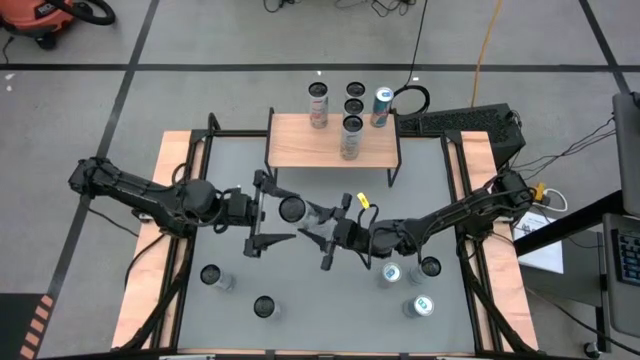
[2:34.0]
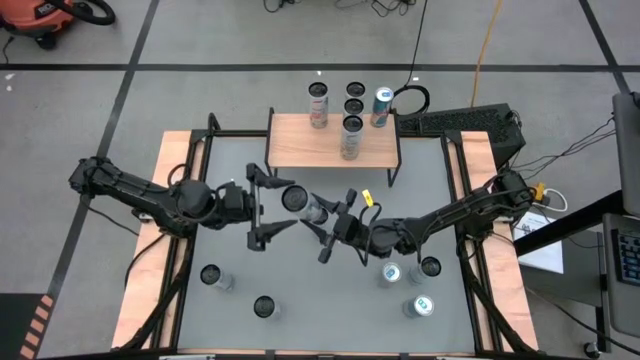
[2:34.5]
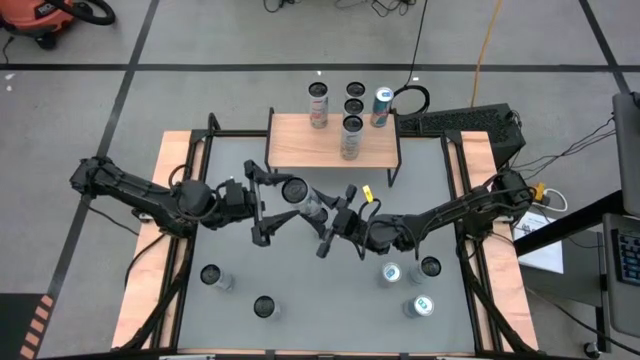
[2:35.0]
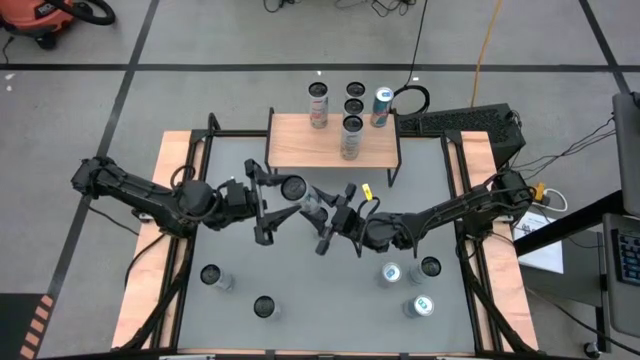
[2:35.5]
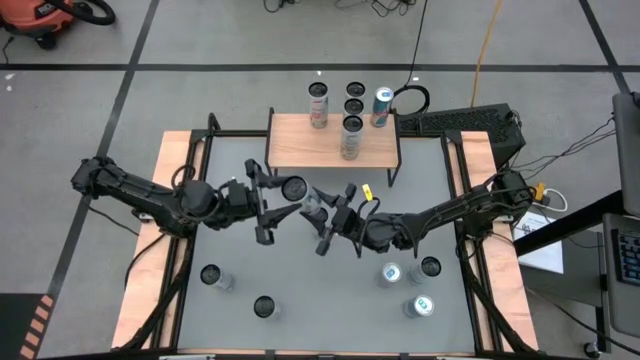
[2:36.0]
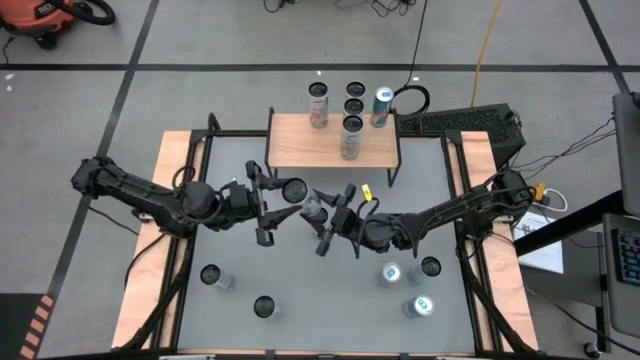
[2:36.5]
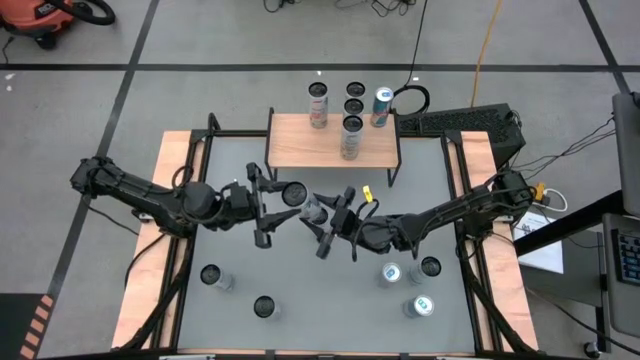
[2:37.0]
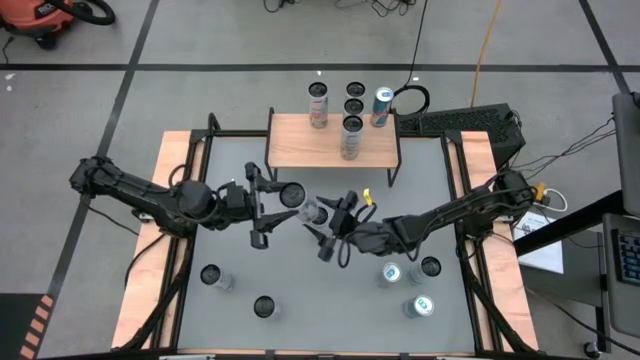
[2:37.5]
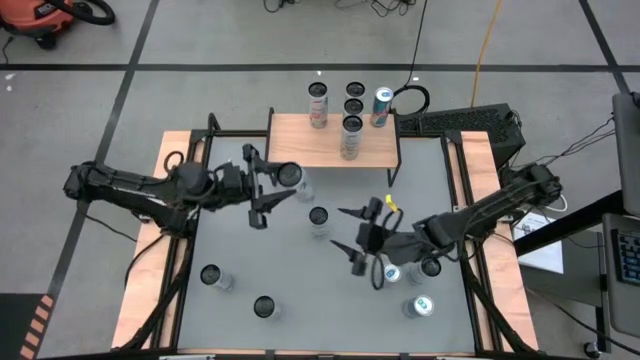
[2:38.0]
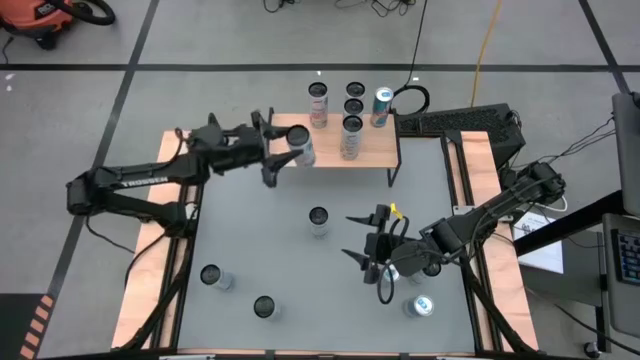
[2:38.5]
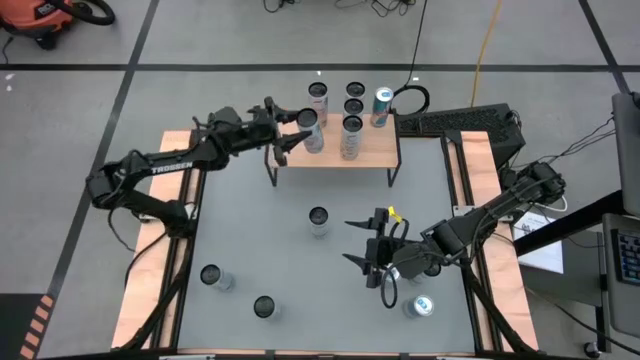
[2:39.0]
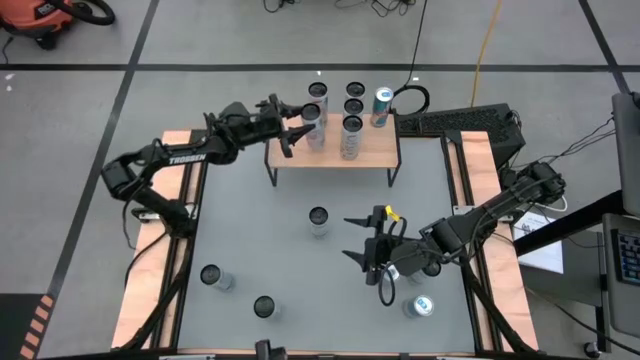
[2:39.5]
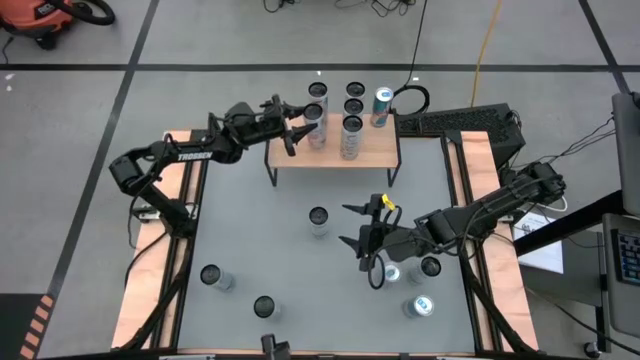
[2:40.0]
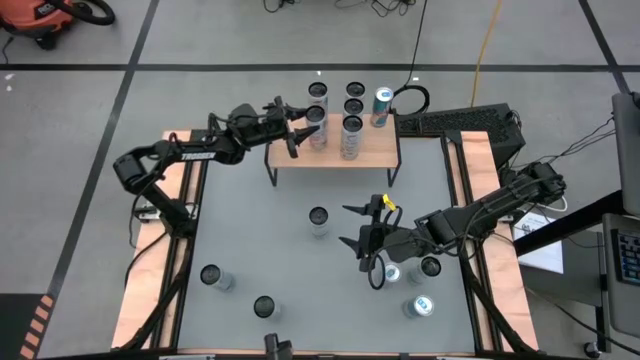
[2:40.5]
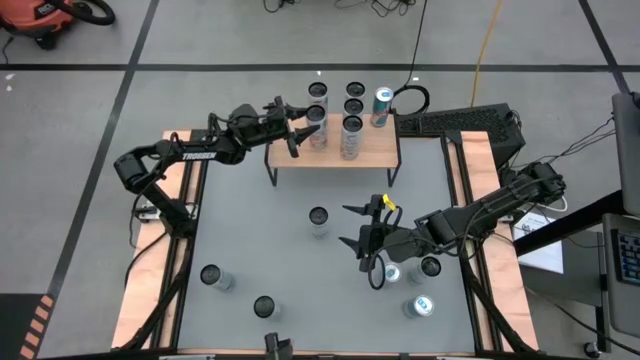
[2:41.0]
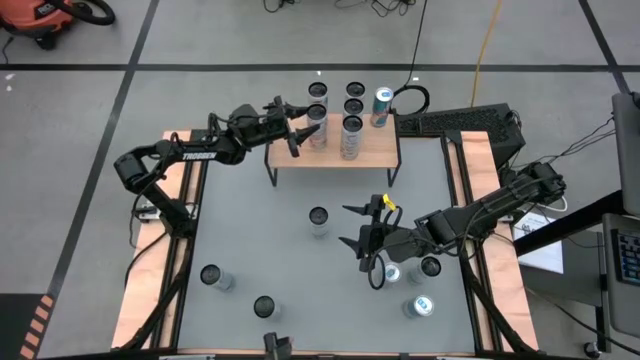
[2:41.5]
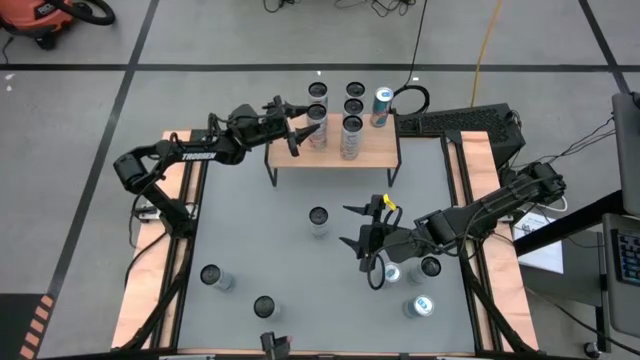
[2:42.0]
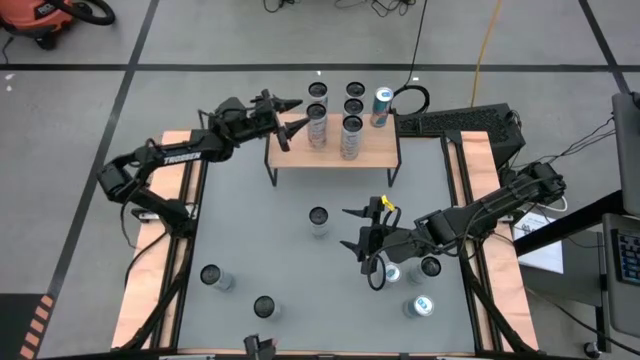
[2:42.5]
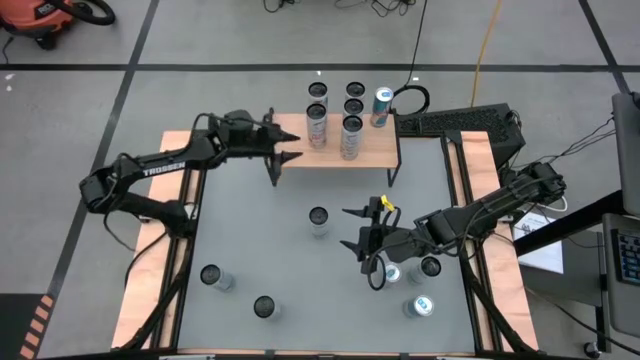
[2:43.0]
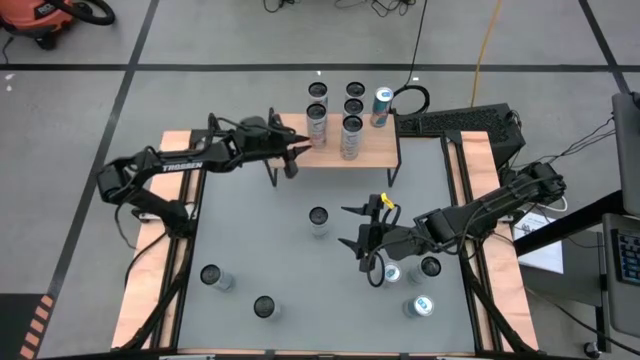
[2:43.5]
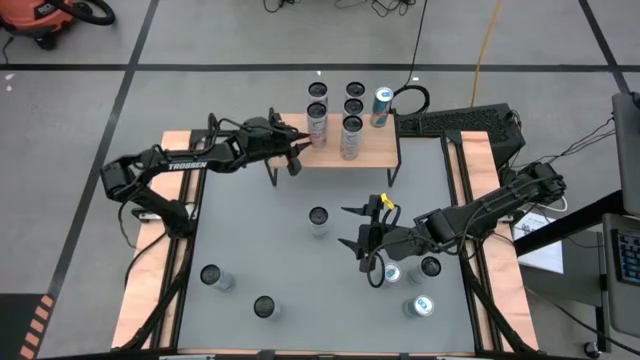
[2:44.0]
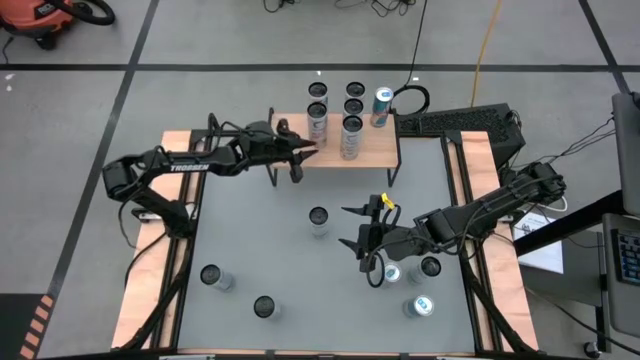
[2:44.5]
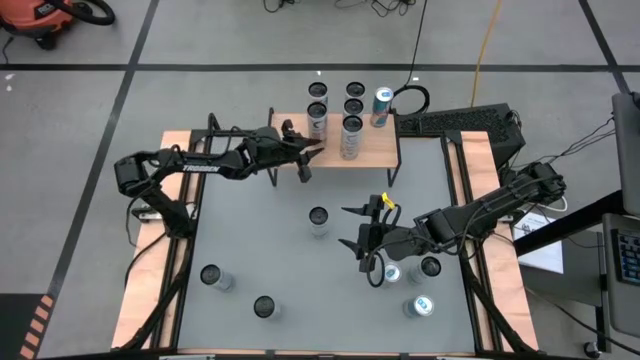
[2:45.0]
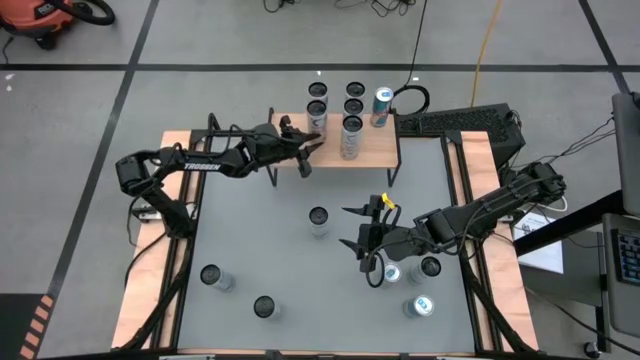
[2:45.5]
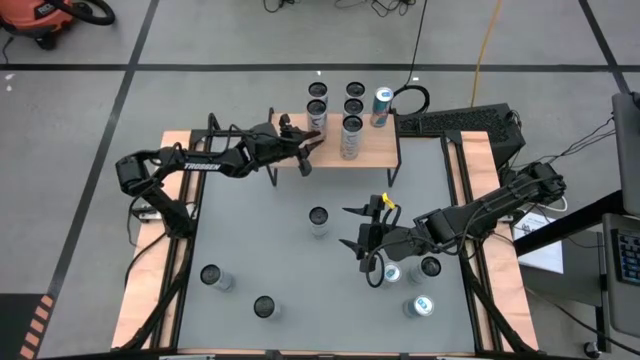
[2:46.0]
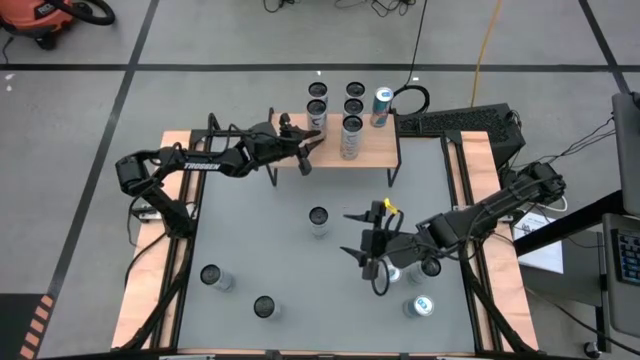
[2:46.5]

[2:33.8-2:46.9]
Task: Place canned beverage on shelf
Put the top white pink soda can on the shelf aligned with the other white pink soda can

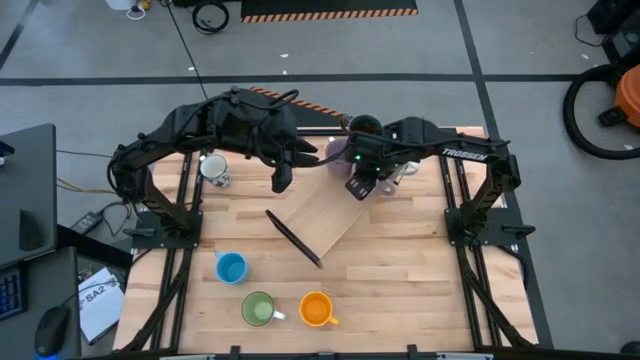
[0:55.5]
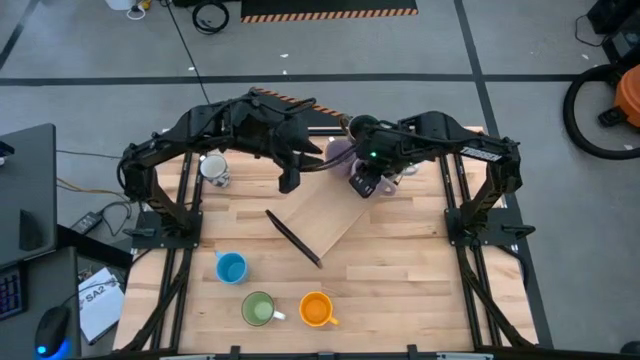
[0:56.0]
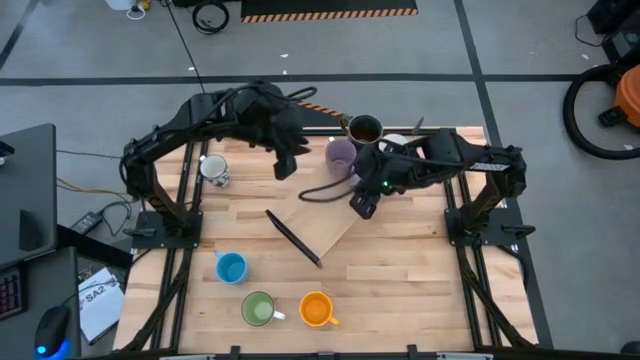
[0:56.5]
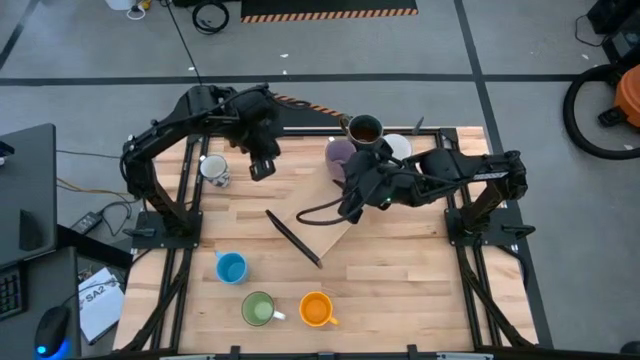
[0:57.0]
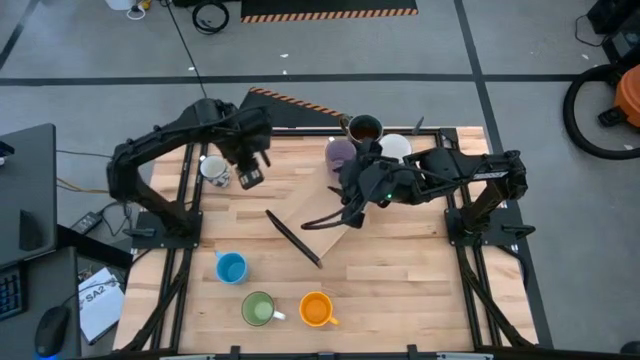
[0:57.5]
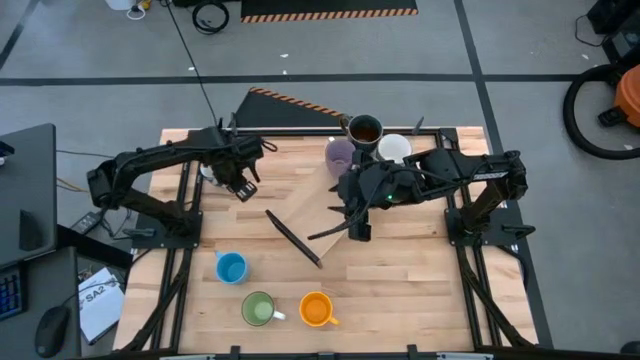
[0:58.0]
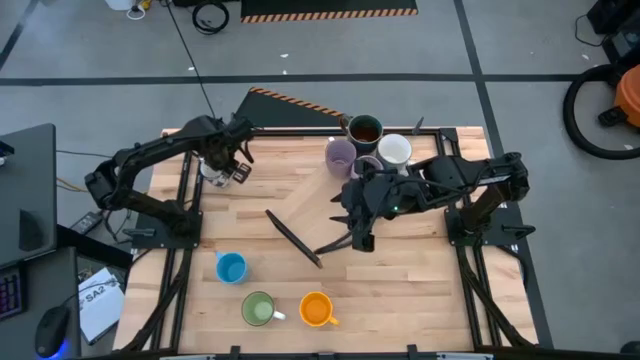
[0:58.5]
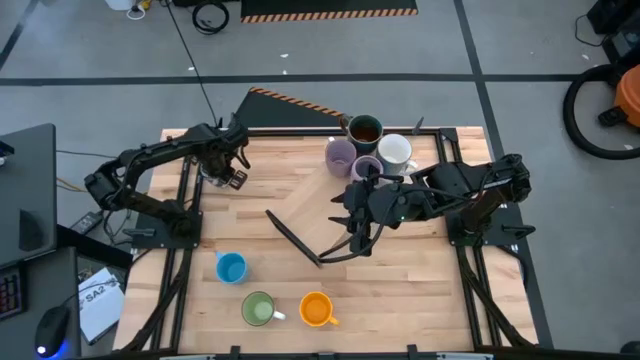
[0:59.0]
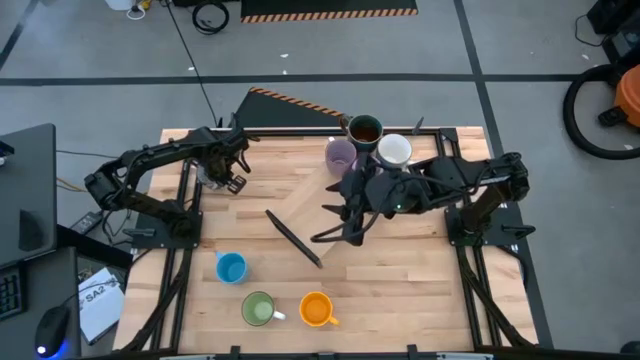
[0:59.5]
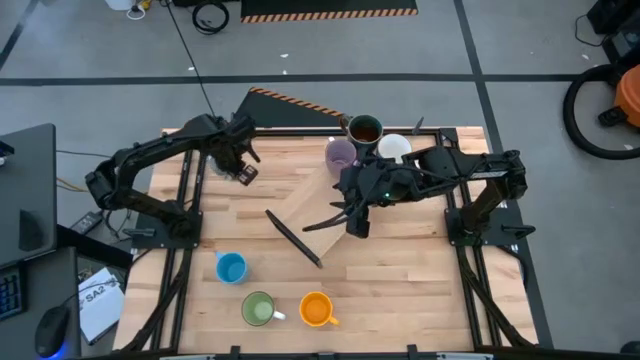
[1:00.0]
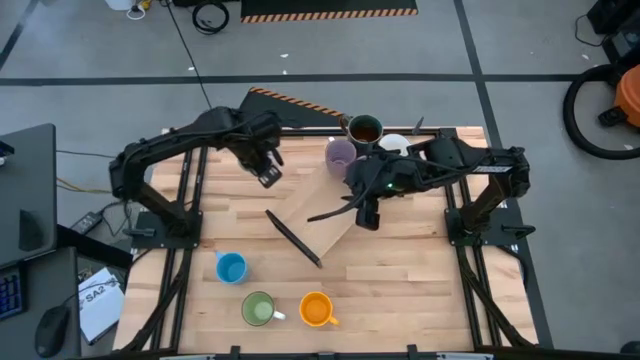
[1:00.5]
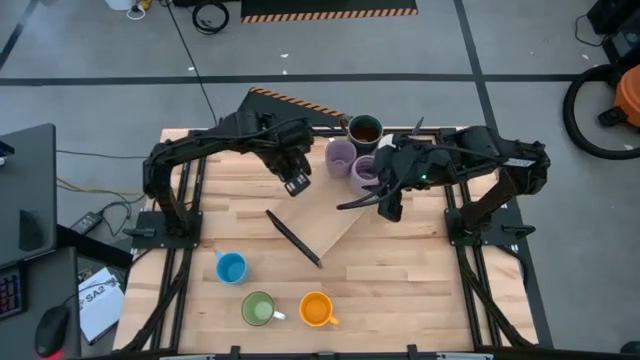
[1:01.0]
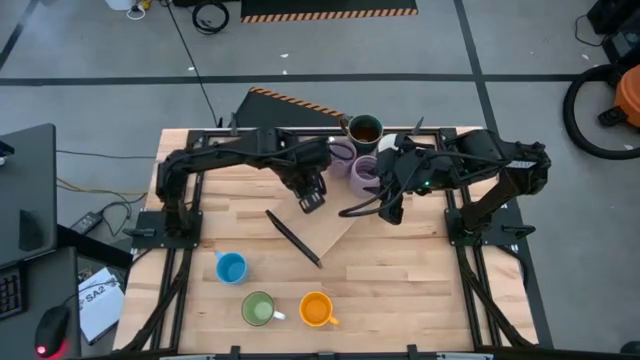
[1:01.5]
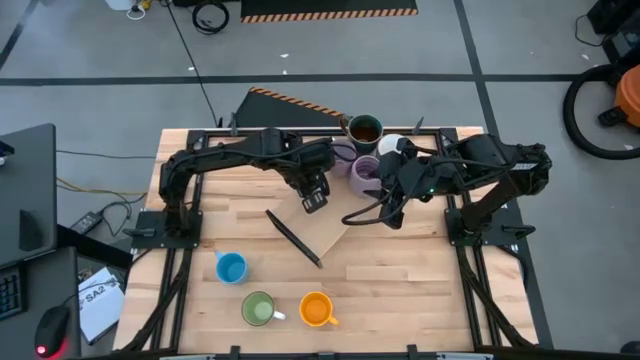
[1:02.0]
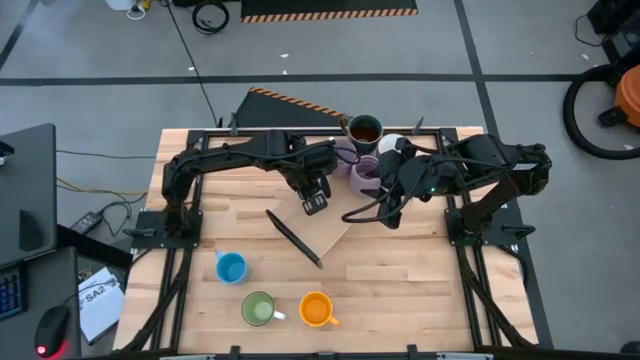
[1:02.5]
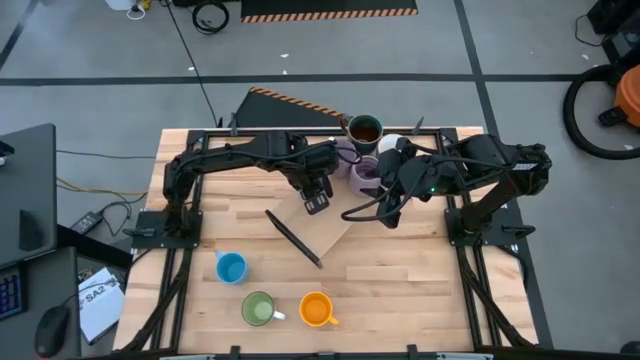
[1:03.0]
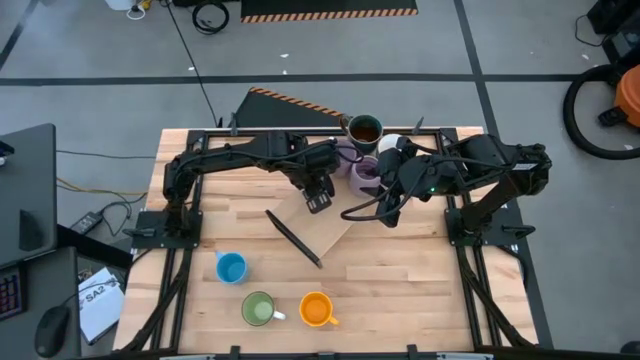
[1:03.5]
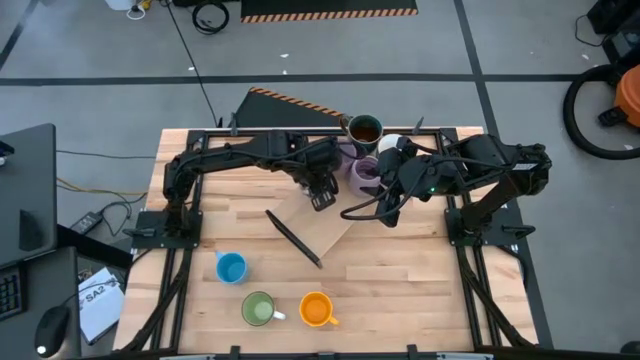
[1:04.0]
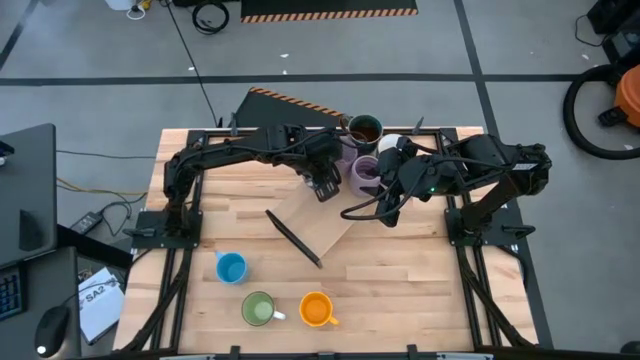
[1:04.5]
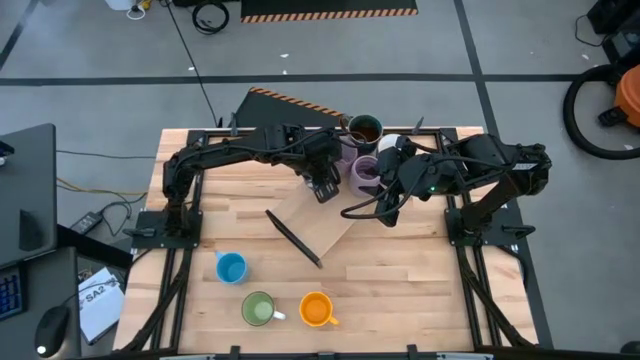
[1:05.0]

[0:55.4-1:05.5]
Task: Place coffee mugs
Put the white blue patterned mug on the shelf
